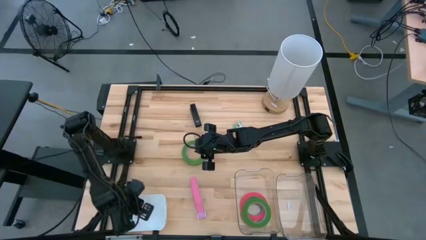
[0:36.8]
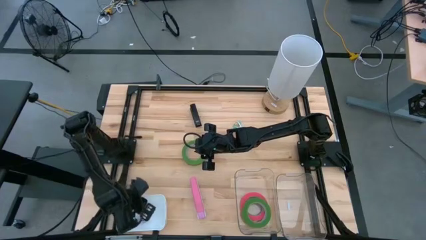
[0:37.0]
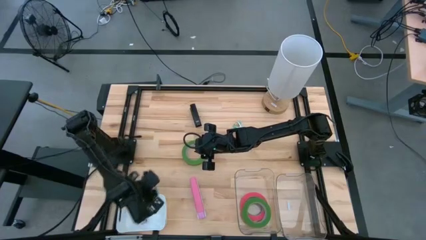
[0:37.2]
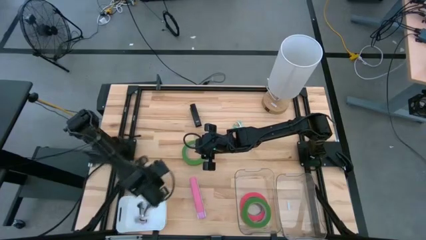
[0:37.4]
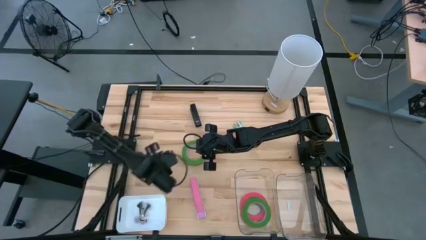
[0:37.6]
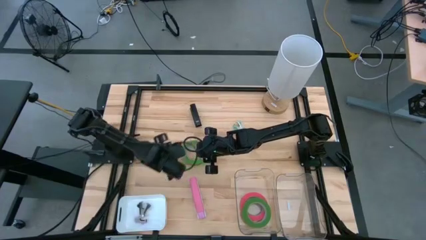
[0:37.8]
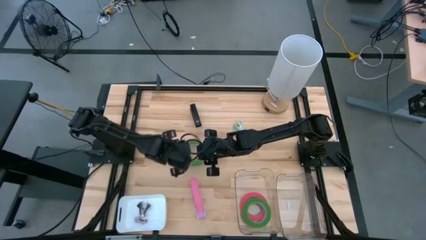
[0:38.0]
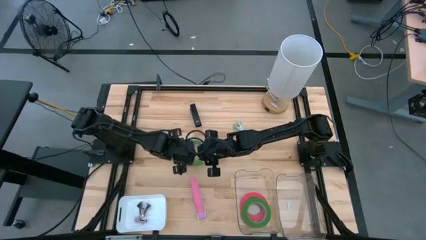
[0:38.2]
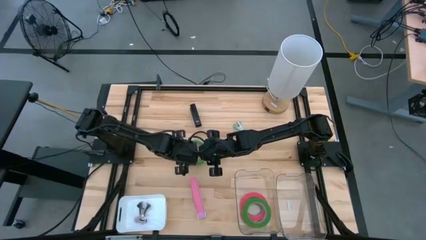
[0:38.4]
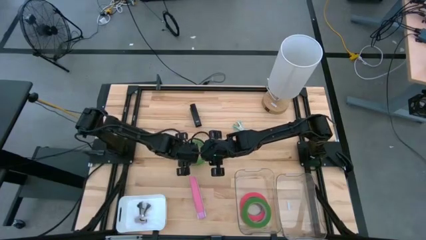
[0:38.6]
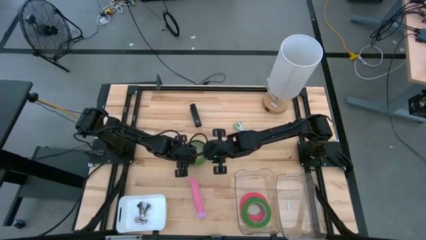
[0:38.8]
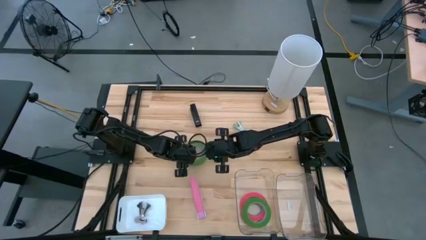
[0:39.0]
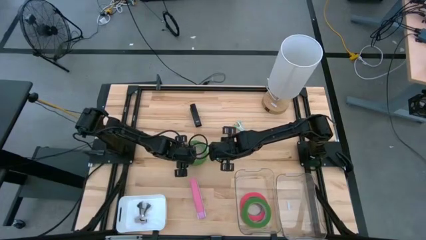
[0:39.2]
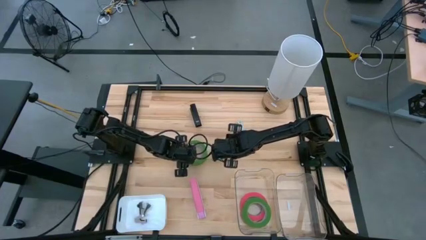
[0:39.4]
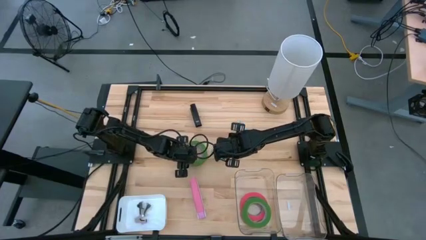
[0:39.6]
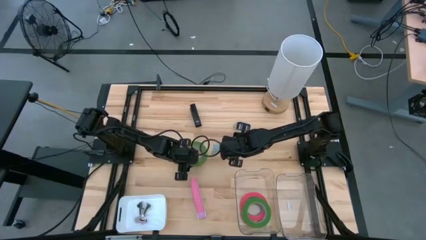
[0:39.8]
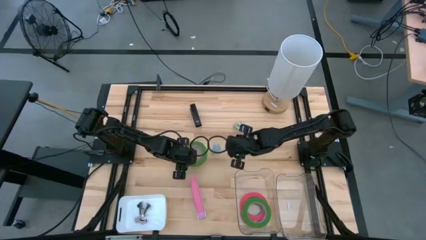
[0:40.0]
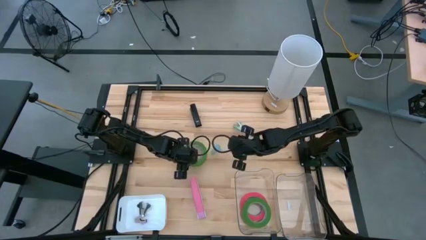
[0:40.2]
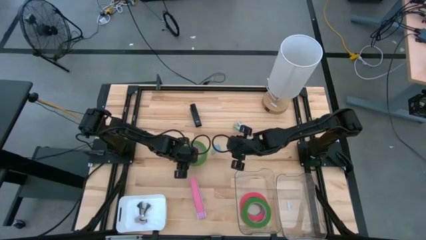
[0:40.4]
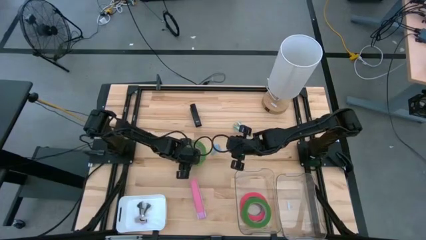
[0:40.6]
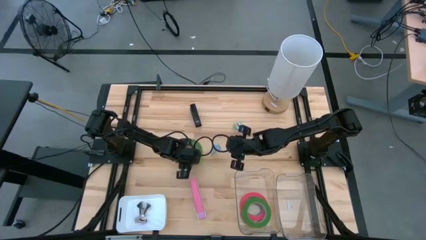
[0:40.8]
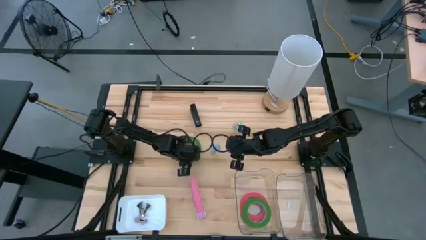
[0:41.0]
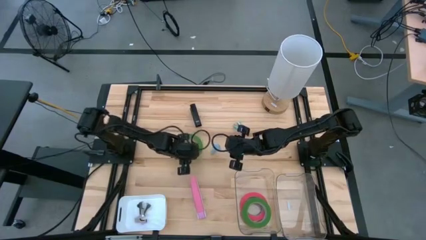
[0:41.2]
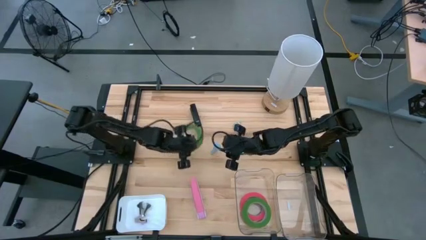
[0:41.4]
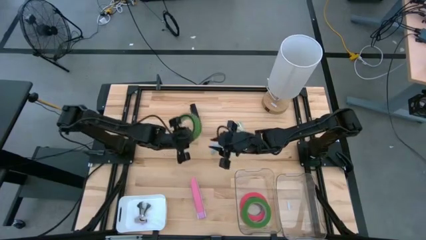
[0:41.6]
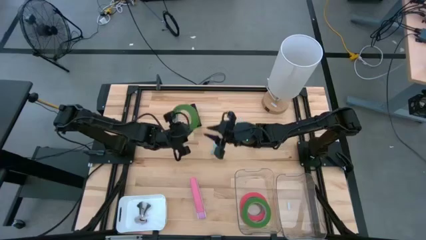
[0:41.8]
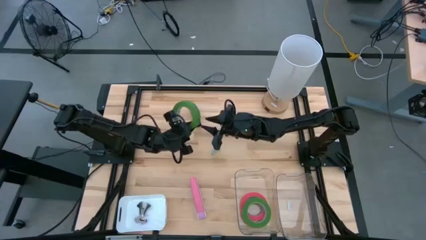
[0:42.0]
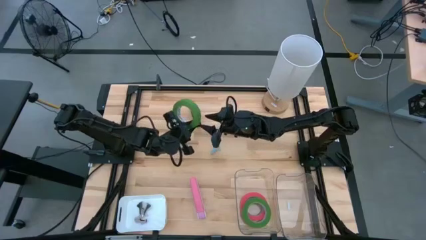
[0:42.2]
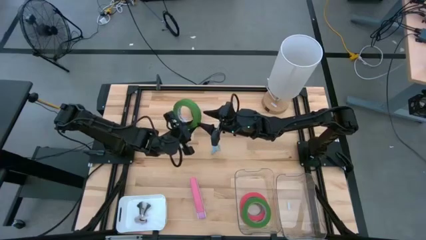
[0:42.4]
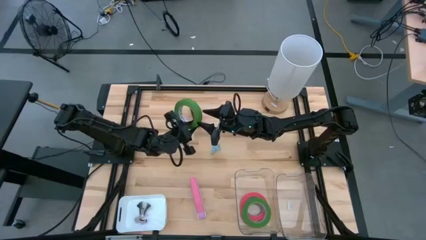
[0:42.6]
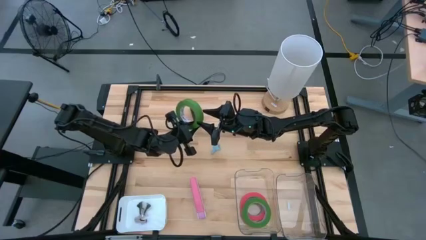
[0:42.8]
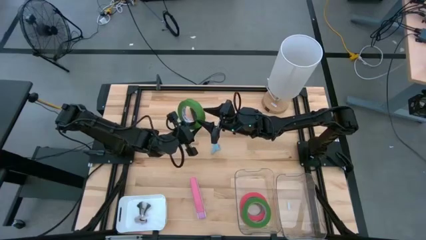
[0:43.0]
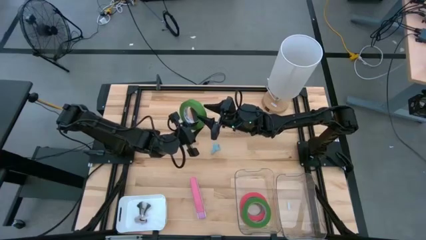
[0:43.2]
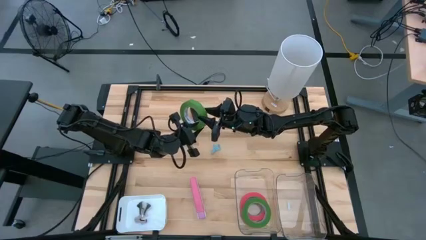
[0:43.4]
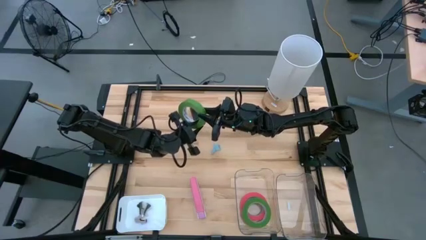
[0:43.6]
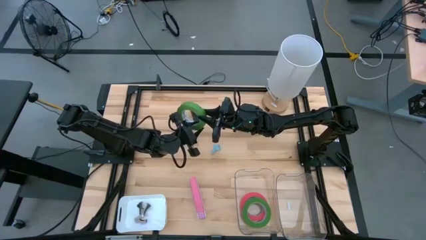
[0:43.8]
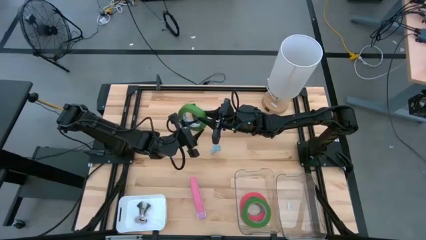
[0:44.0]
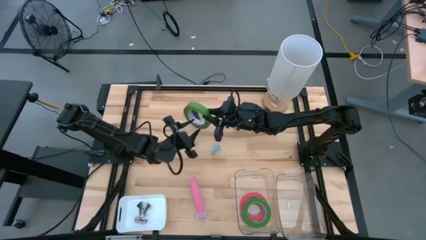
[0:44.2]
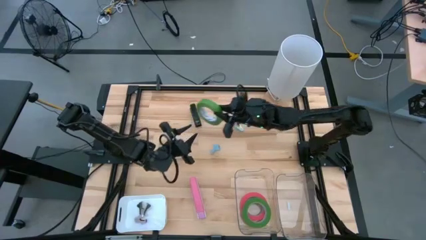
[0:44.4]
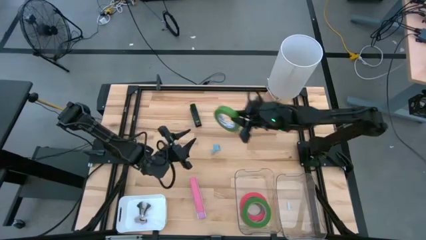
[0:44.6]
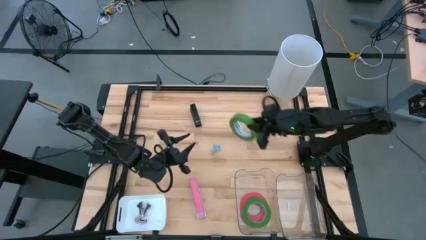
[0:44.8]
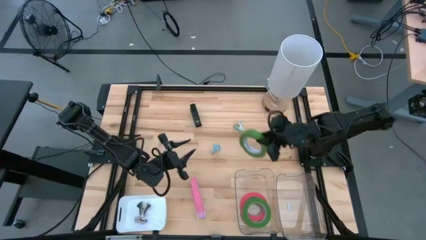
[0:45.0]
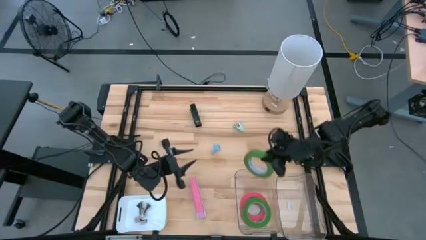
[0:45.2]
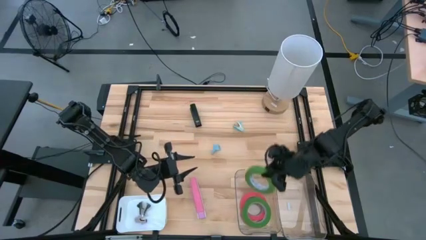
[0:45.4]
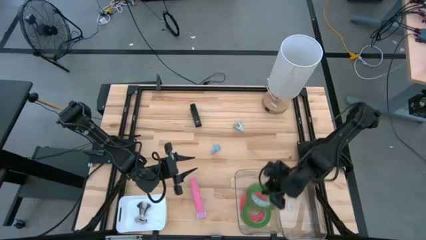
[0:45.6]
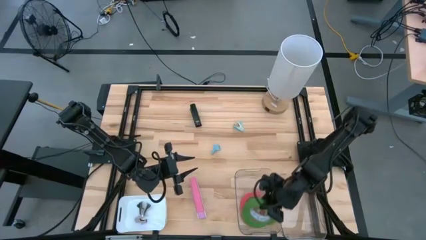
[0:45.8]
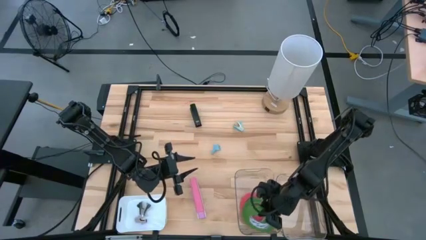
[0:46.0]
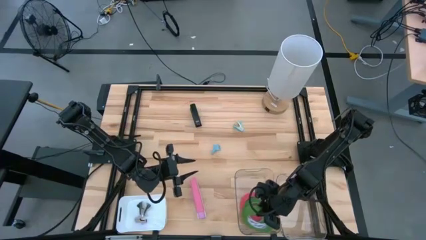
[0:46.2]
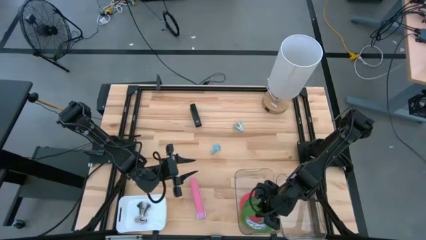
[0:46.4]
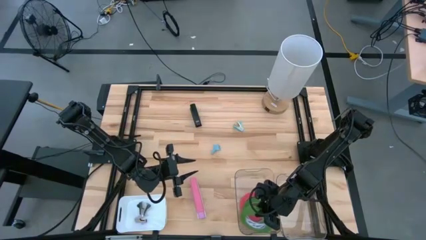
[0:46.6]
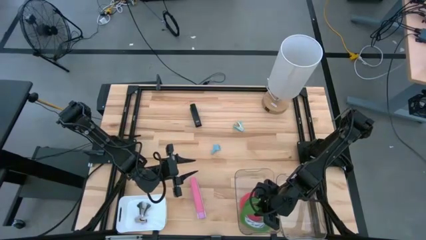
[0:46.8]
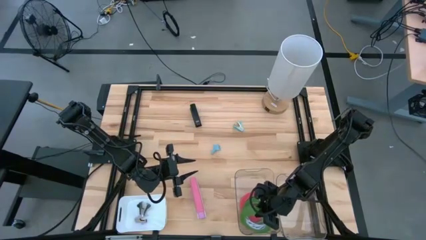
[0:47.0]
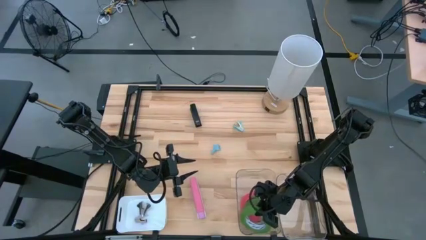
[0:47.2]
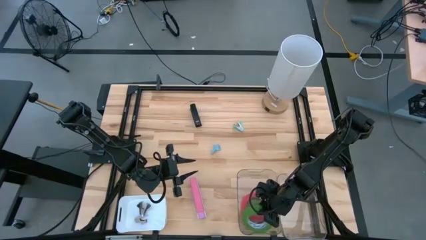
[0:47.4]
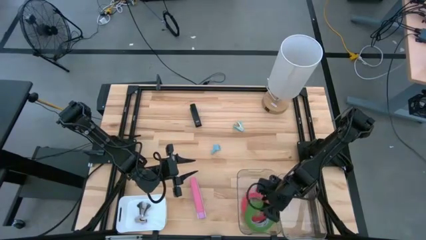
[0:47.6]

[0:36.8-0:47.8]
Task: Pick and place Stapler, Stapler remover, tape
Put the tape into the left transparent bin
